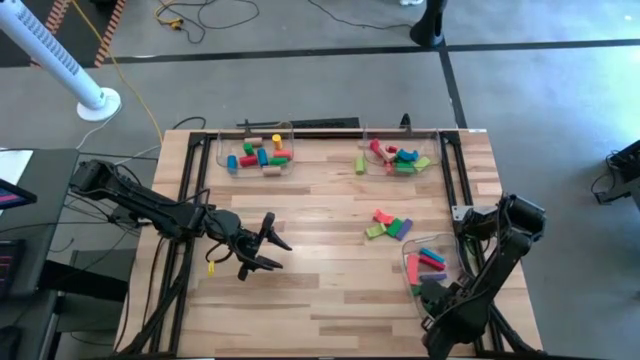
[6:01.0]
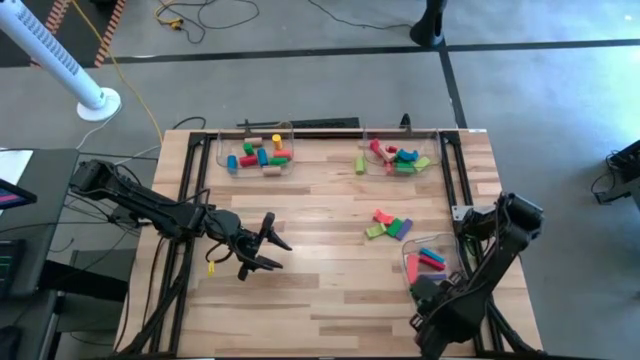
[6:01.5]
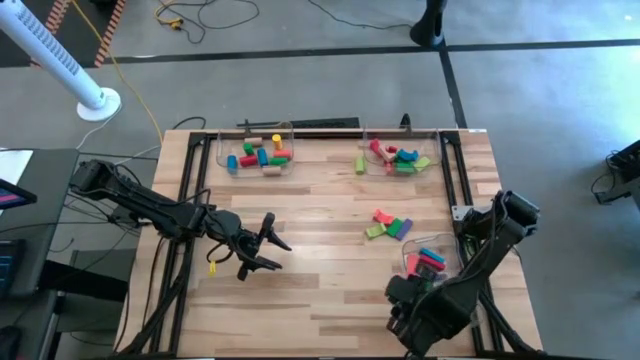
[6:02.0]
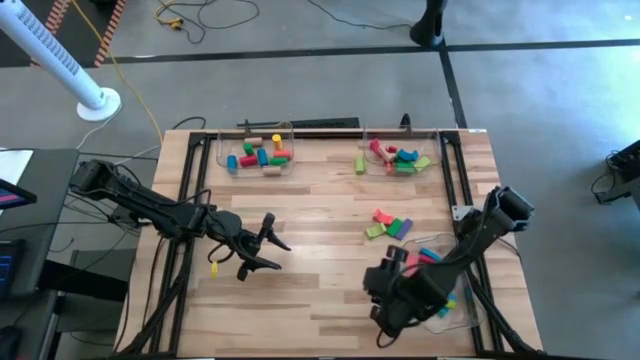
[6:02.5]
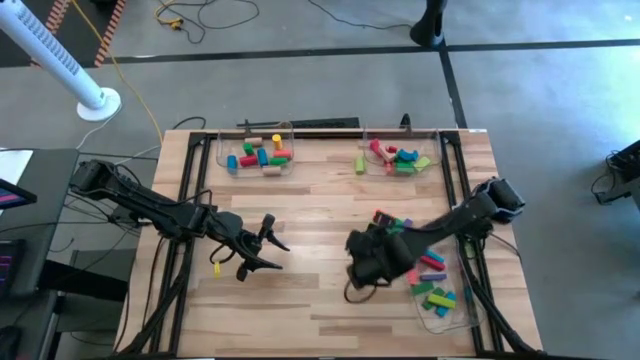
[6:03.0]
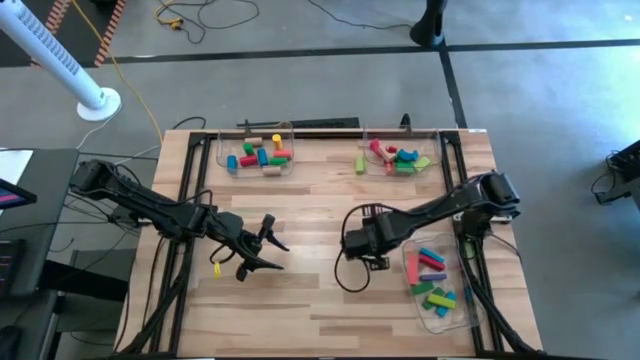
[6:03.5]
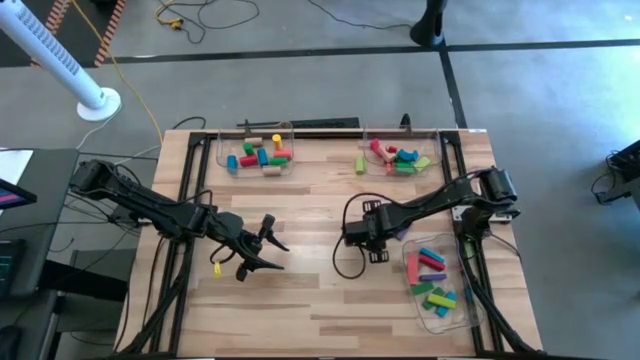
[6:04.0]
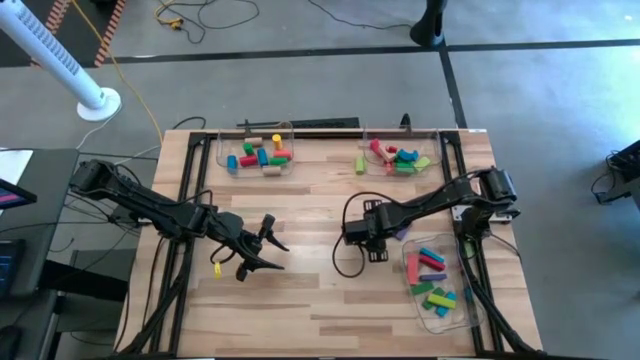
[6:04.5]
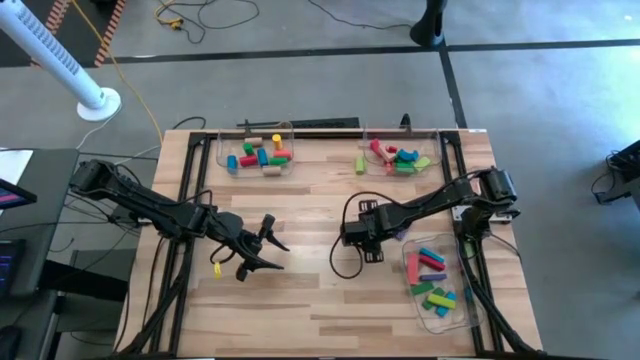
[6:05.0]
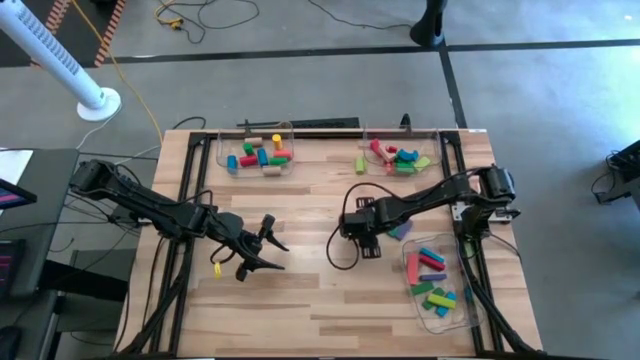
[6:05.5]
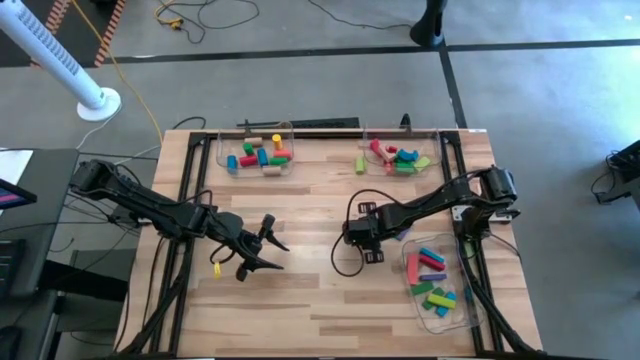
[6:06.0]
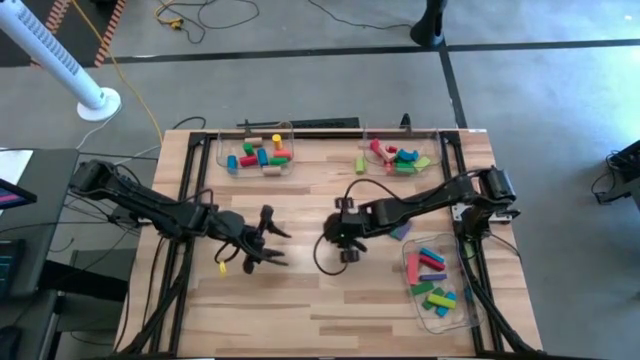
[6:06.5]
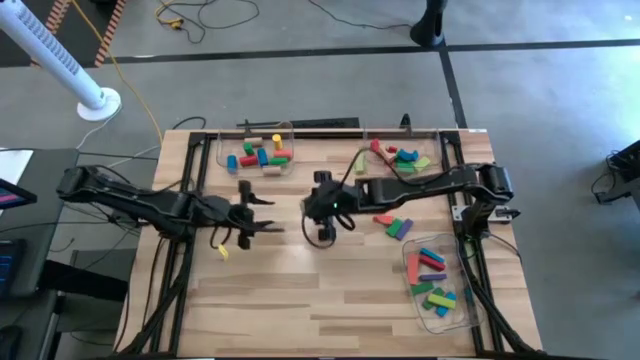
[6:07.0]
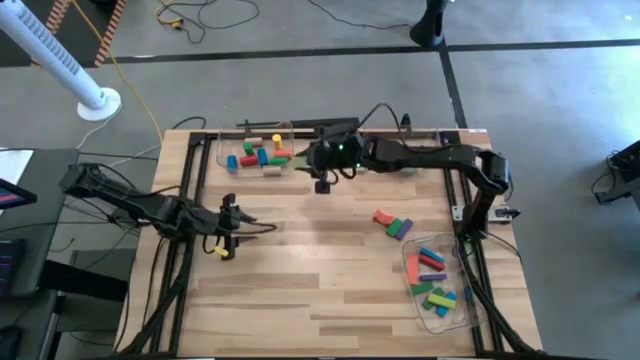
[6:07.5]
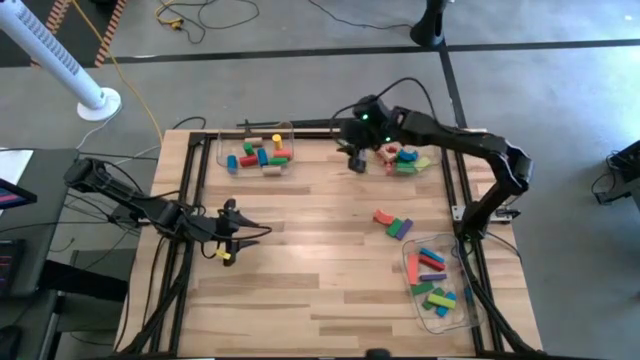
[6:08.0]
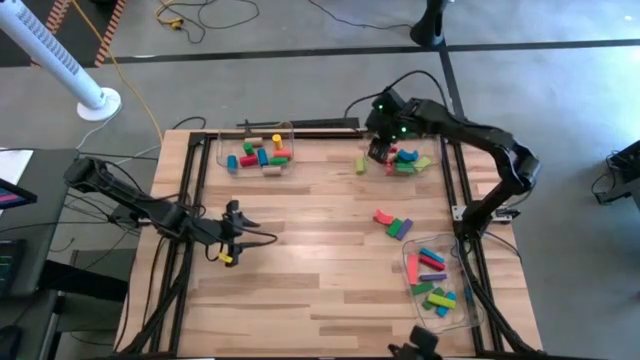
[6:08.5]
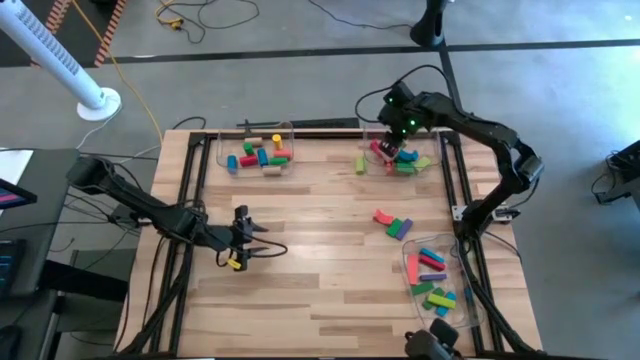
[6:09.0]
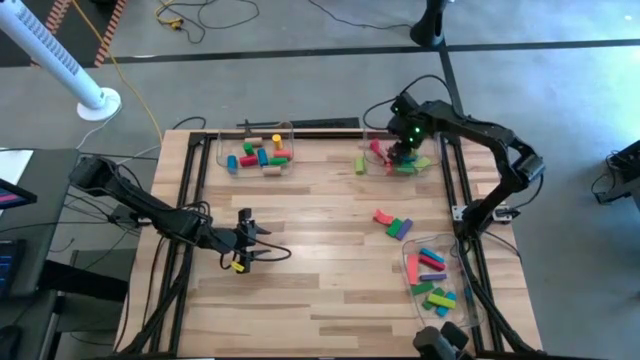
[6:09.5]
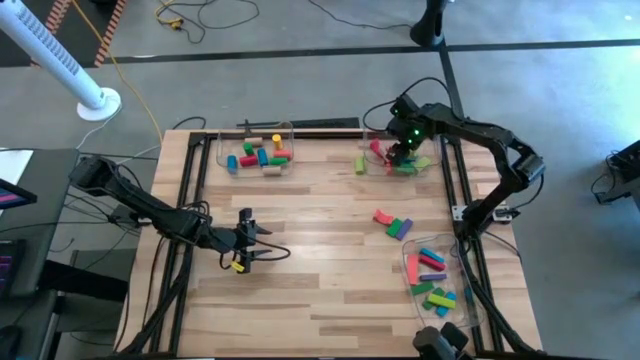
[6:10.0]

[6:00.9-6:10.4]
Task: Sort blocks by size
Put the light green arch block into the top right transparent bin

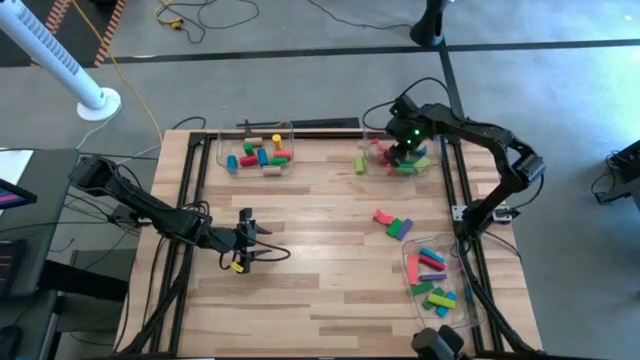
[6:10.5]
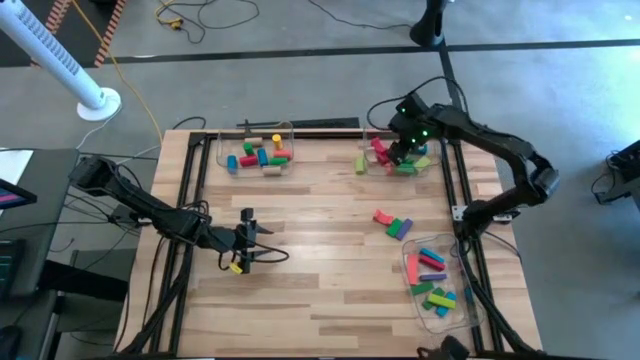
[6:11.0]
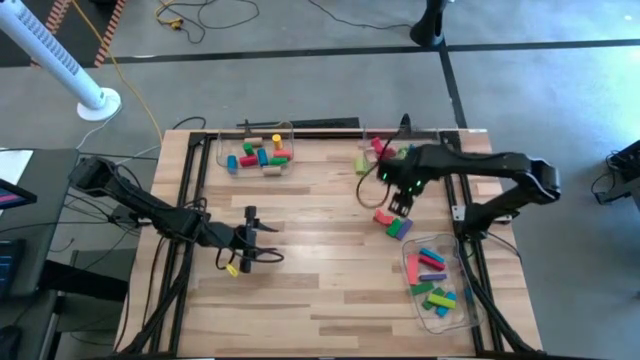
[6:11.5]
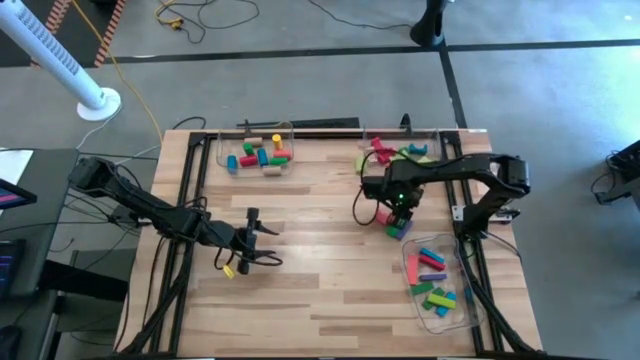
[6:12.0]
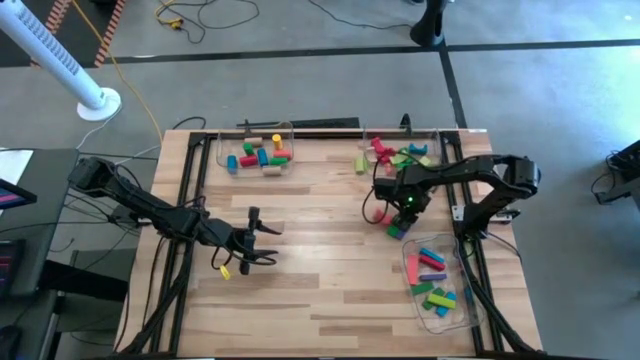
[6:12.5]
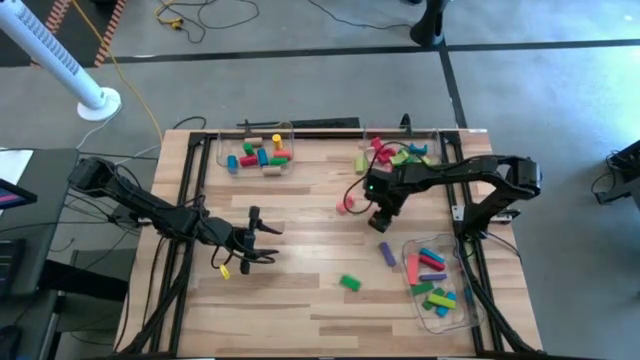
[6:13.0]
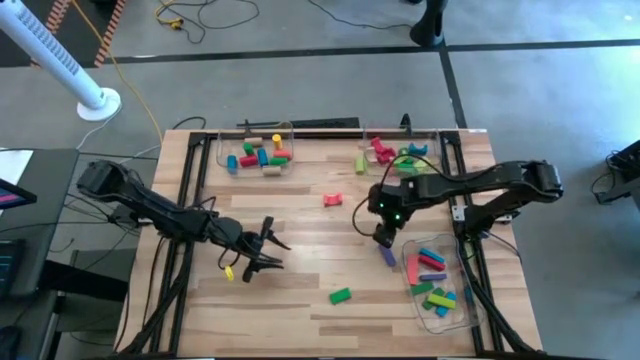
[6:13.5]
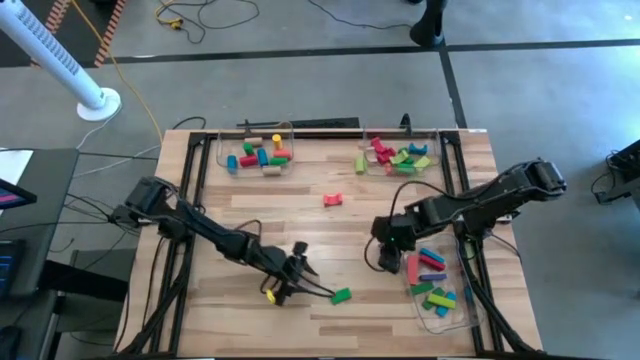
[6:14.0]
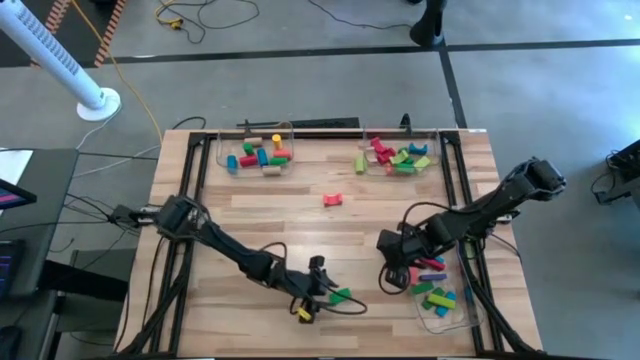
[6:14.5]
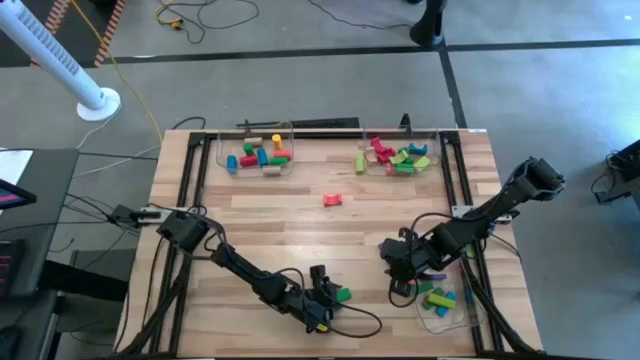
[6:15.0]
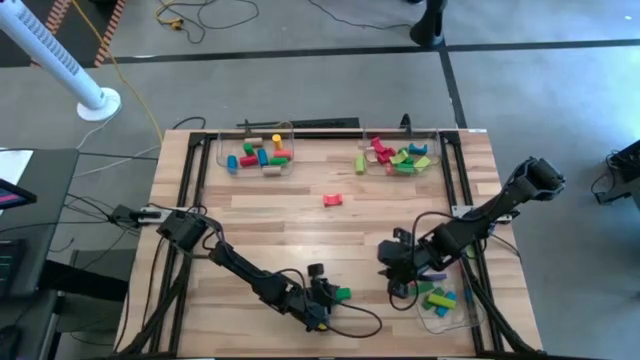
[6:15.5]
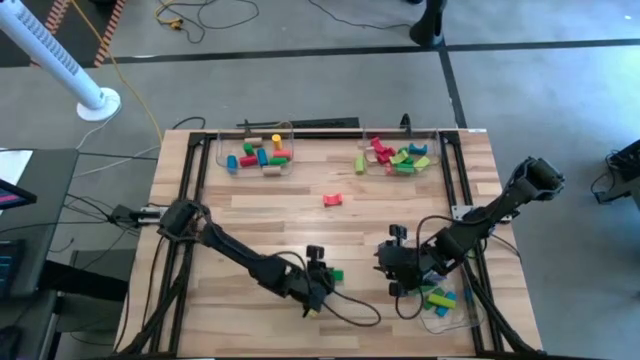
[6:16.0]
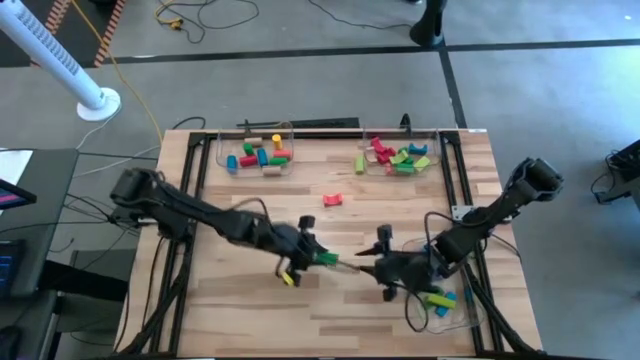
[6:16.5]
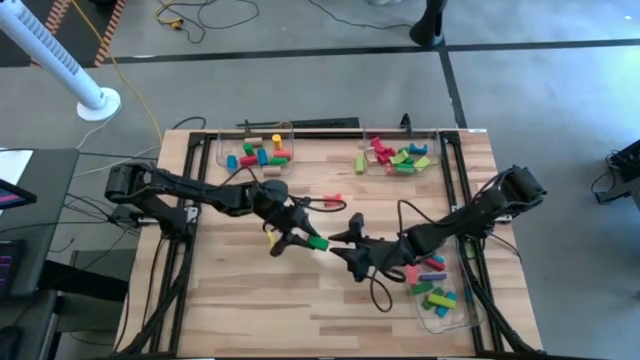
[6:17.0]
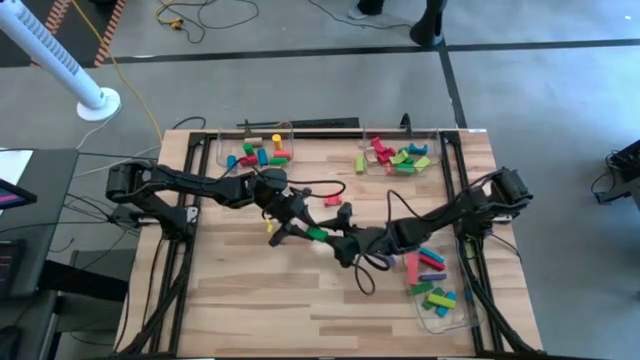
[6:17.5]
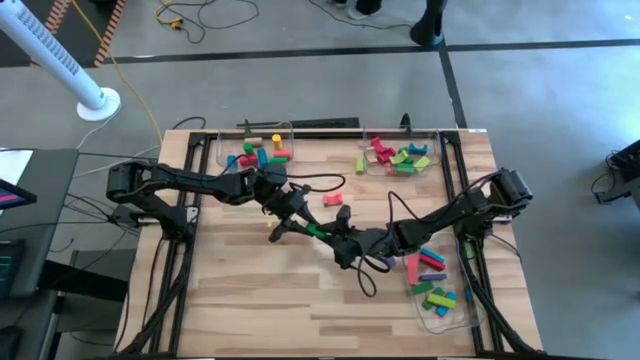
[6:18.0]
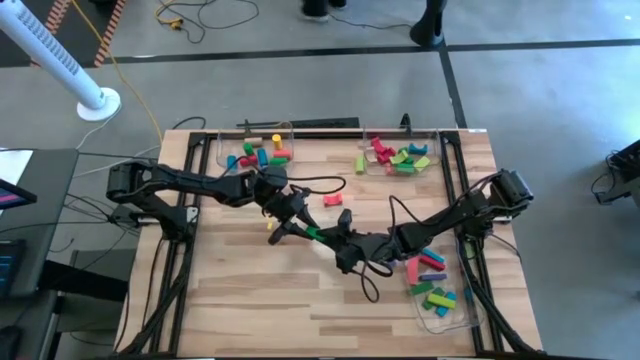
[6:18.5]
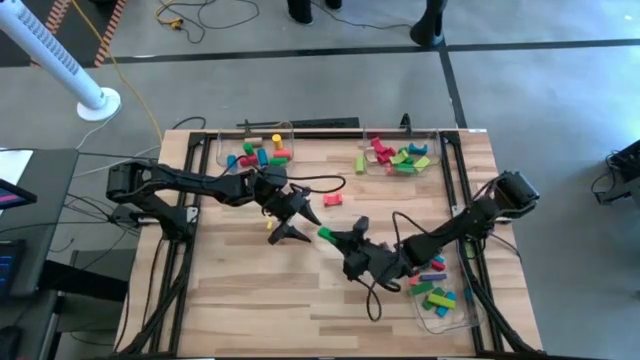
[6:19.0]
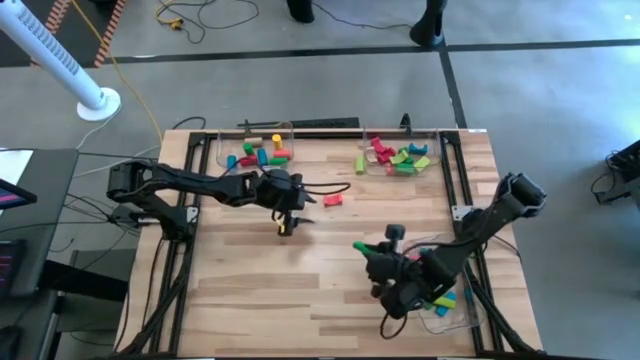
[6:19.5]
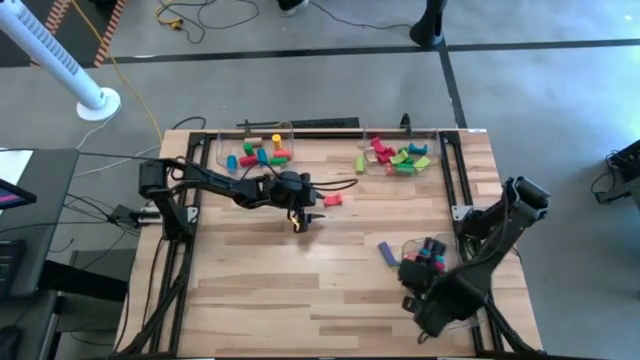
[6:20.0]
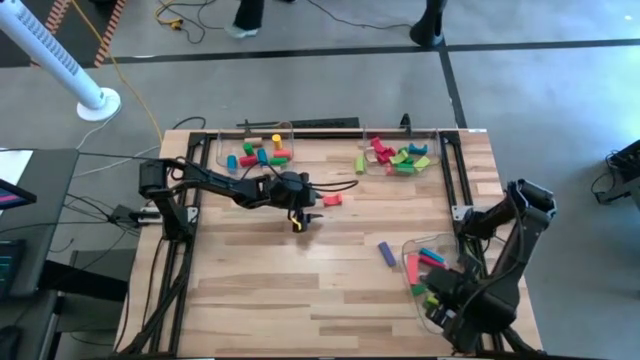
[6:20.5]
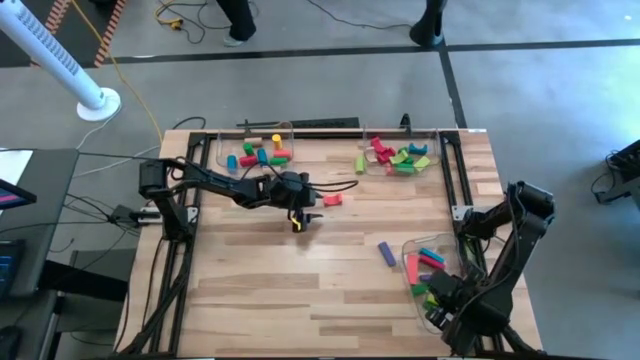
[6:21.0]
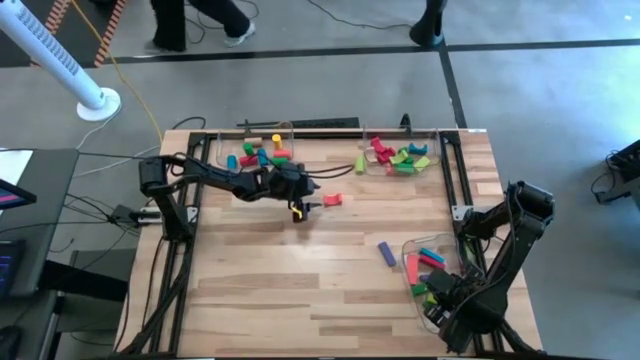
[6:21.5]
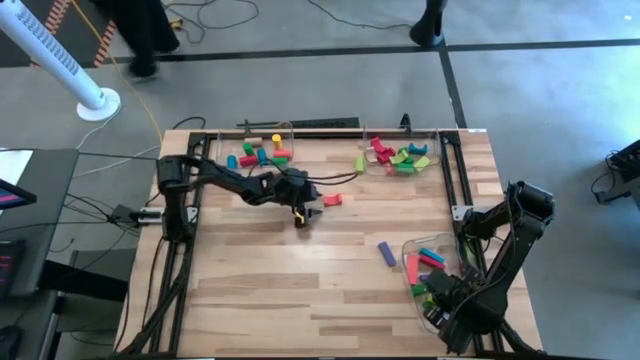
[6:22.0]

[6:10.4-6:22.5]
Put the green rectangular block into the bottom transparent bin
